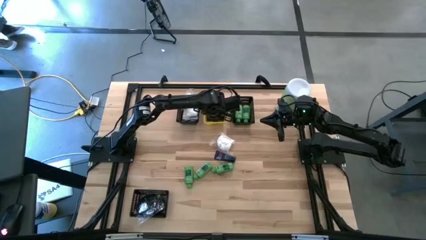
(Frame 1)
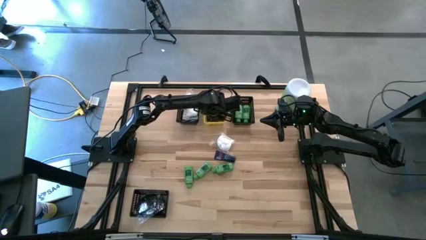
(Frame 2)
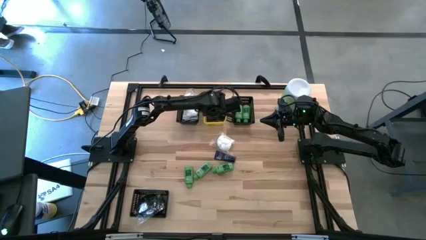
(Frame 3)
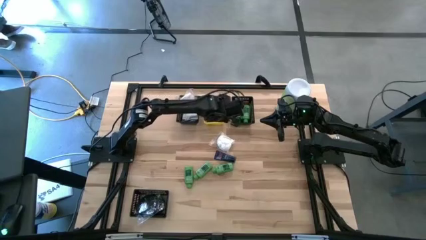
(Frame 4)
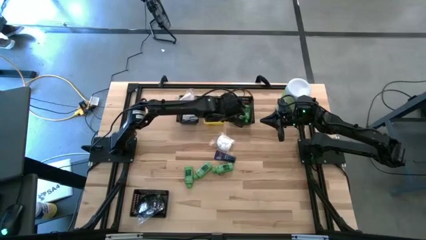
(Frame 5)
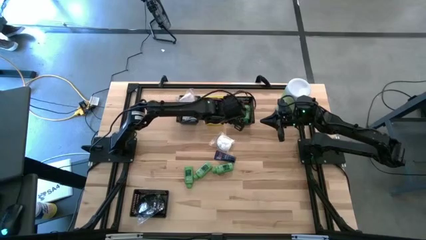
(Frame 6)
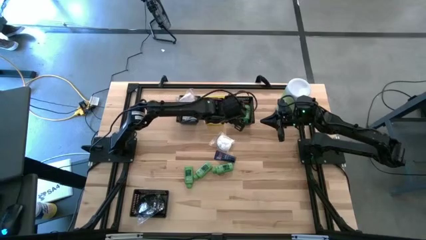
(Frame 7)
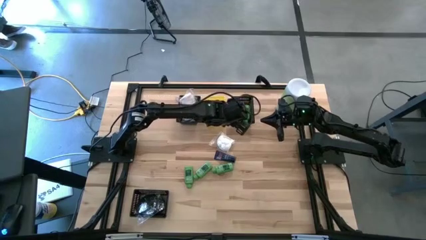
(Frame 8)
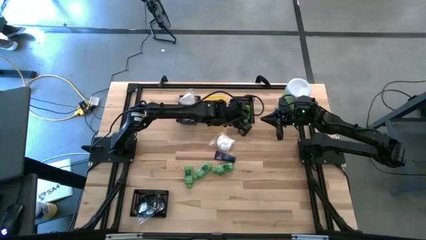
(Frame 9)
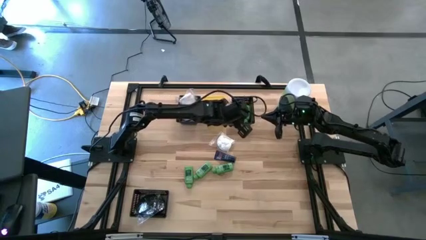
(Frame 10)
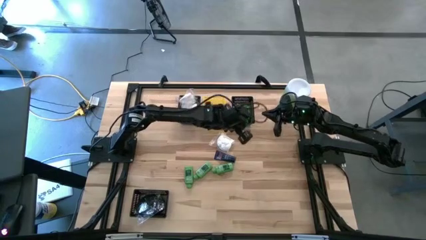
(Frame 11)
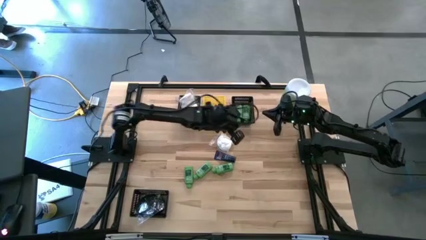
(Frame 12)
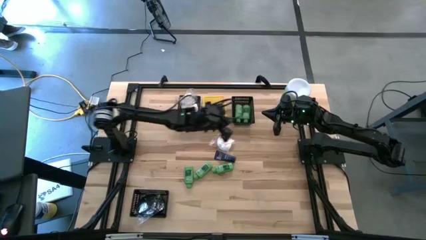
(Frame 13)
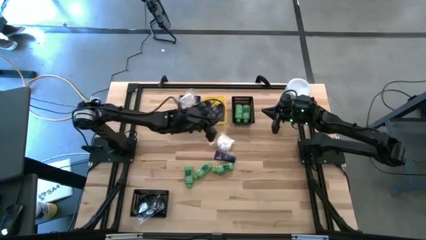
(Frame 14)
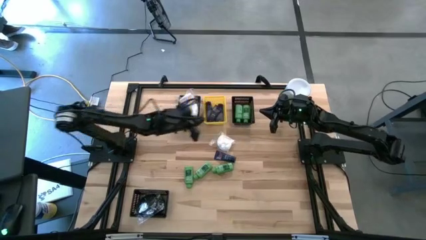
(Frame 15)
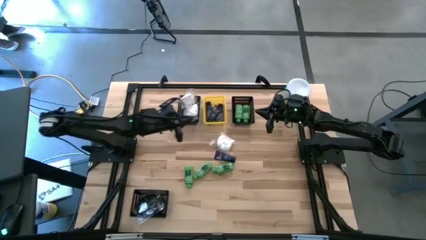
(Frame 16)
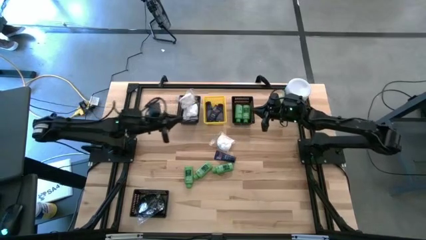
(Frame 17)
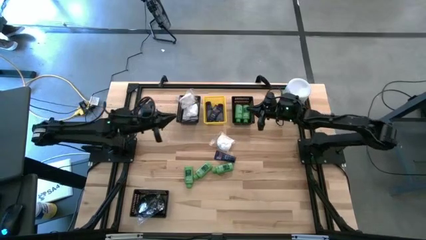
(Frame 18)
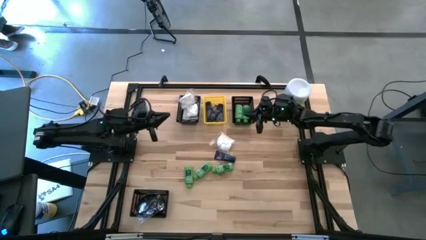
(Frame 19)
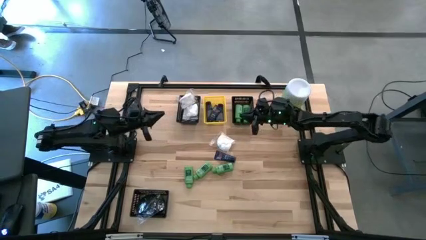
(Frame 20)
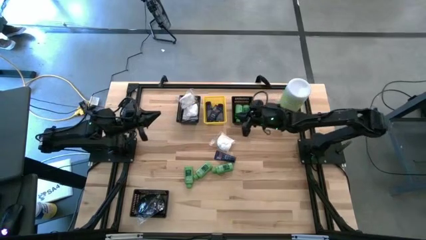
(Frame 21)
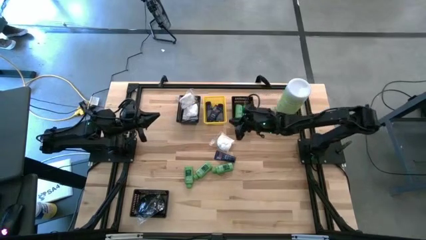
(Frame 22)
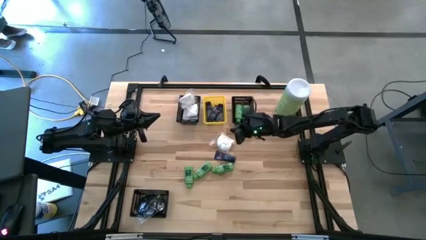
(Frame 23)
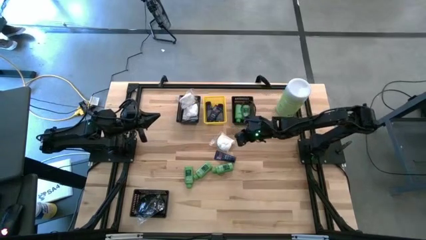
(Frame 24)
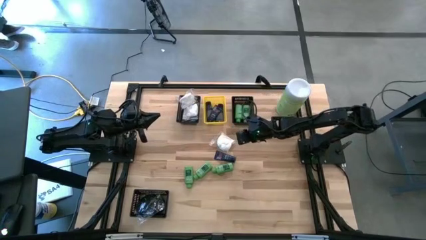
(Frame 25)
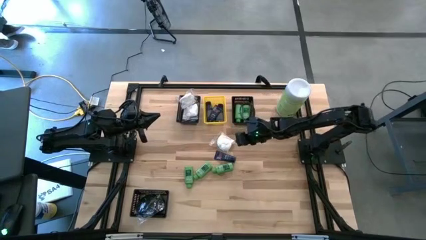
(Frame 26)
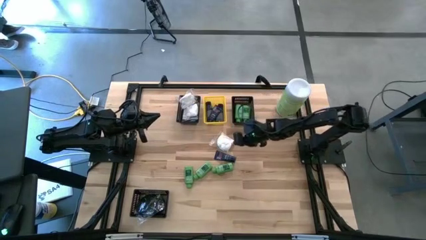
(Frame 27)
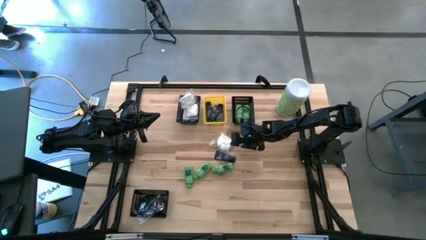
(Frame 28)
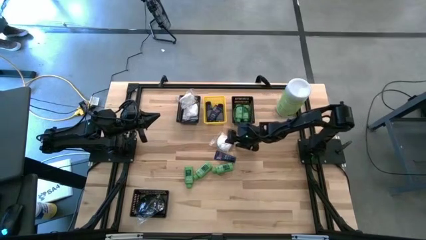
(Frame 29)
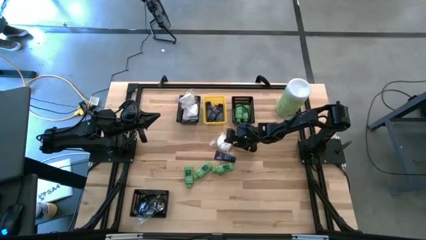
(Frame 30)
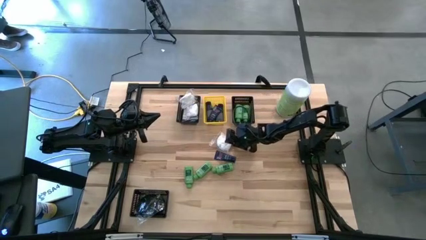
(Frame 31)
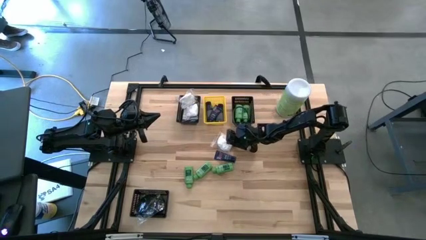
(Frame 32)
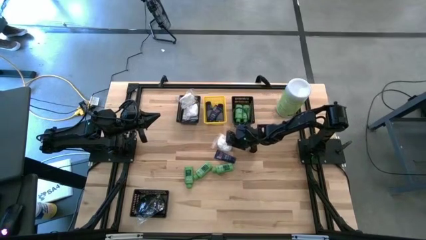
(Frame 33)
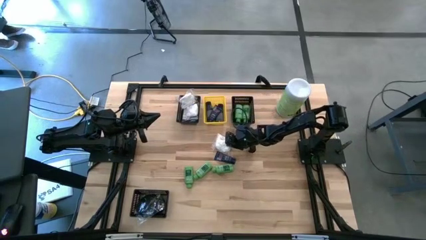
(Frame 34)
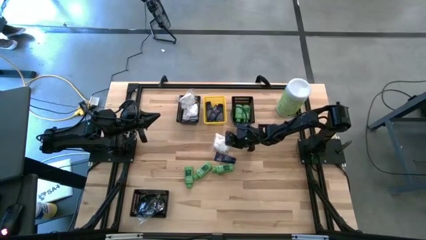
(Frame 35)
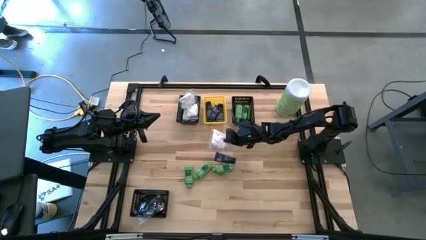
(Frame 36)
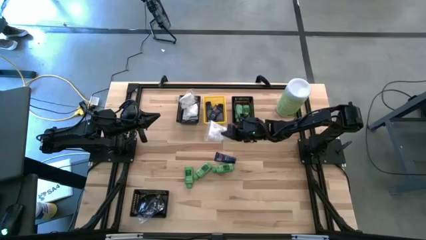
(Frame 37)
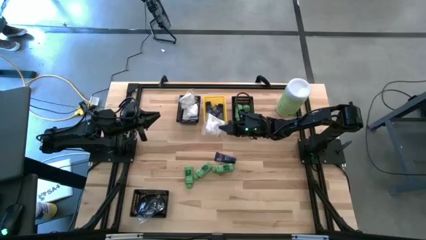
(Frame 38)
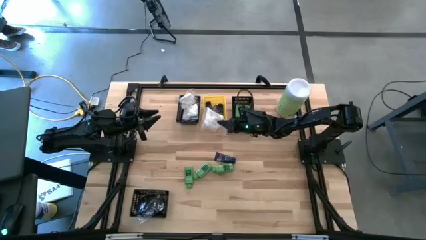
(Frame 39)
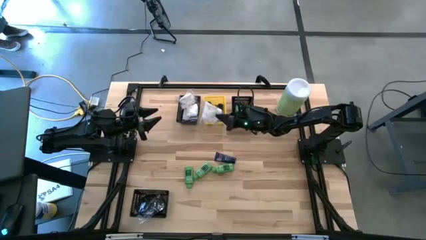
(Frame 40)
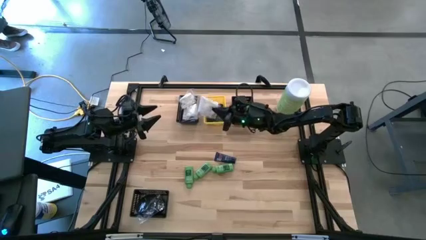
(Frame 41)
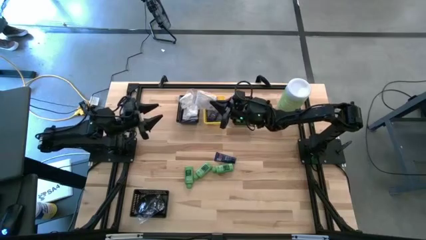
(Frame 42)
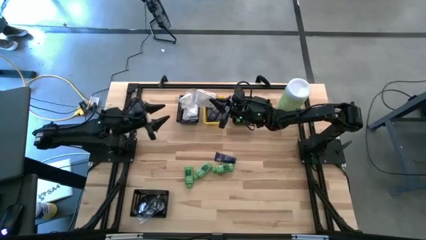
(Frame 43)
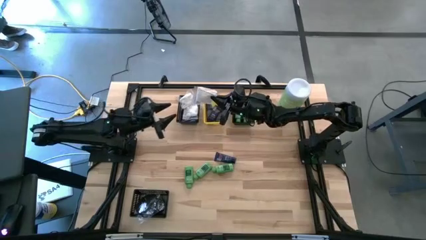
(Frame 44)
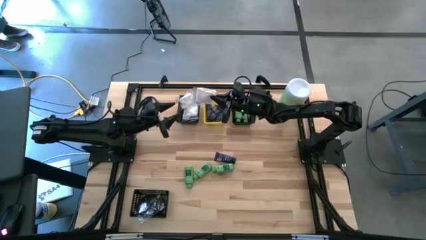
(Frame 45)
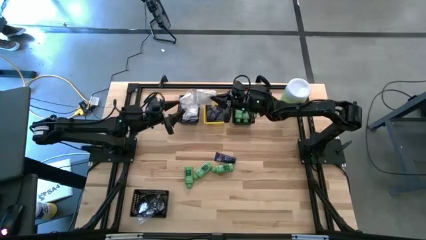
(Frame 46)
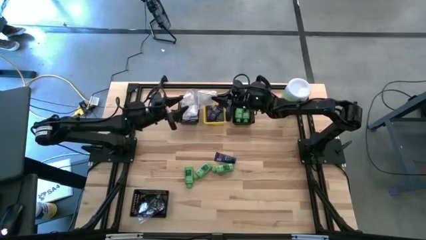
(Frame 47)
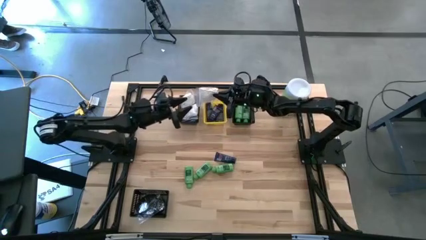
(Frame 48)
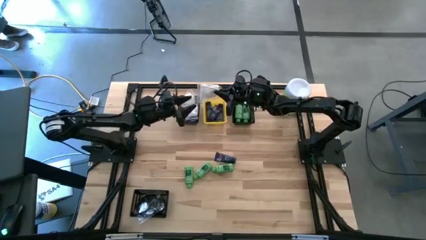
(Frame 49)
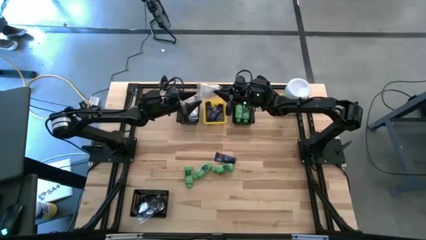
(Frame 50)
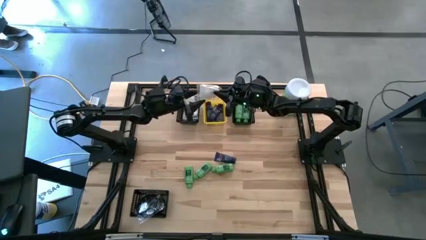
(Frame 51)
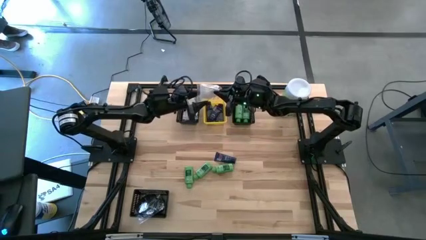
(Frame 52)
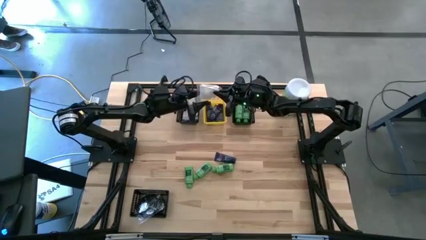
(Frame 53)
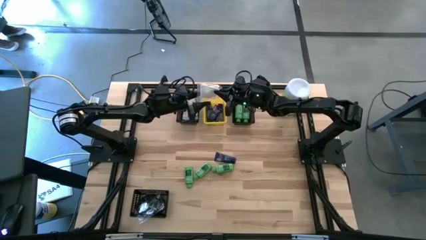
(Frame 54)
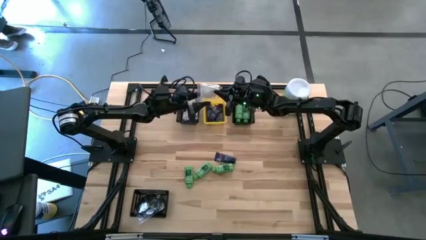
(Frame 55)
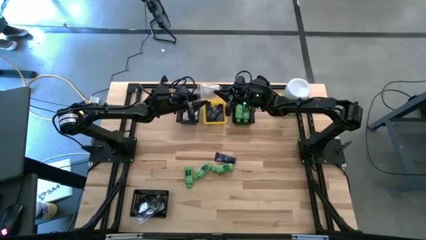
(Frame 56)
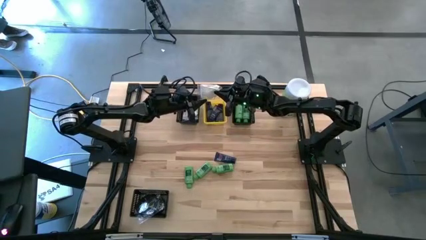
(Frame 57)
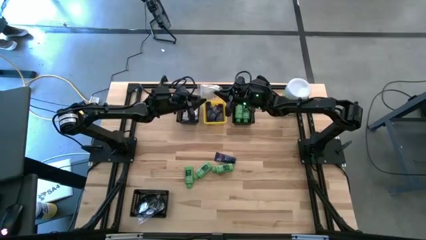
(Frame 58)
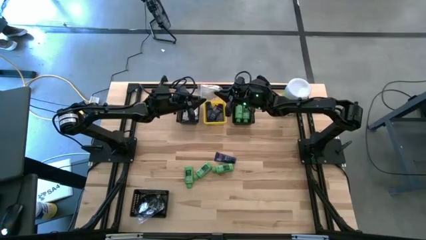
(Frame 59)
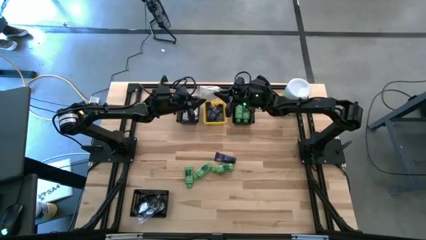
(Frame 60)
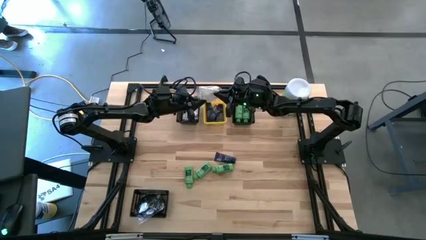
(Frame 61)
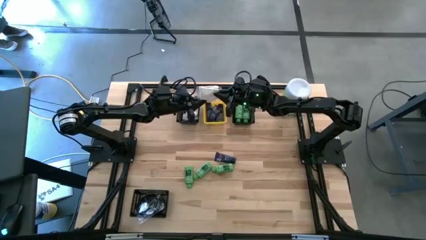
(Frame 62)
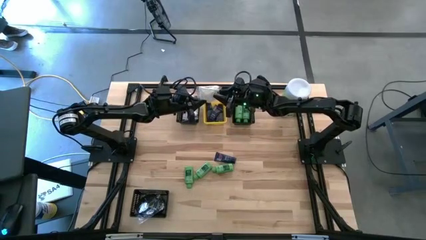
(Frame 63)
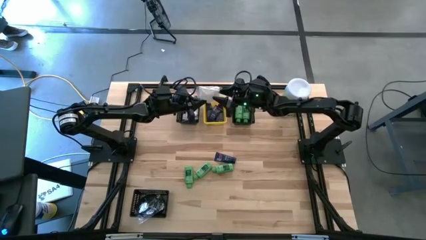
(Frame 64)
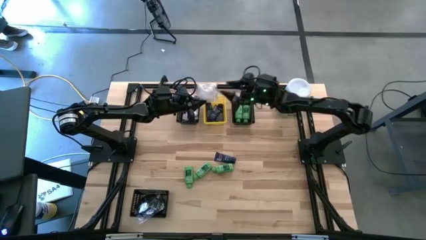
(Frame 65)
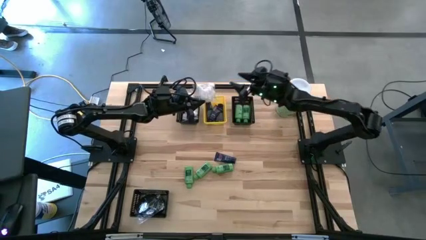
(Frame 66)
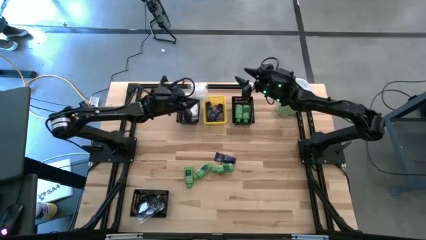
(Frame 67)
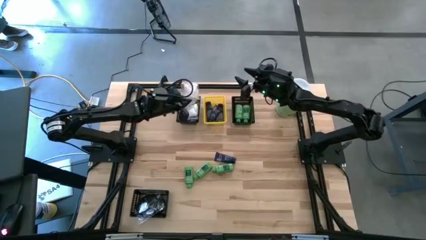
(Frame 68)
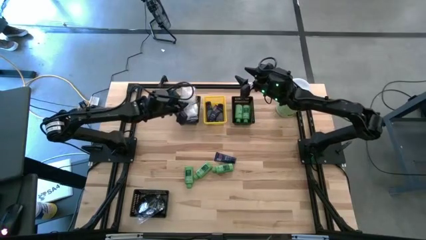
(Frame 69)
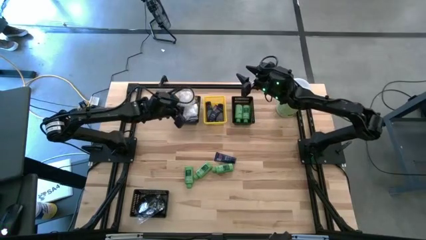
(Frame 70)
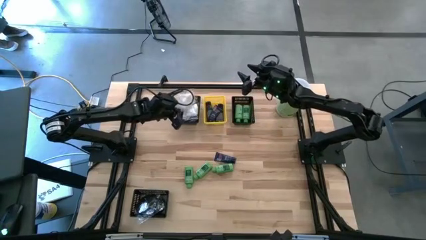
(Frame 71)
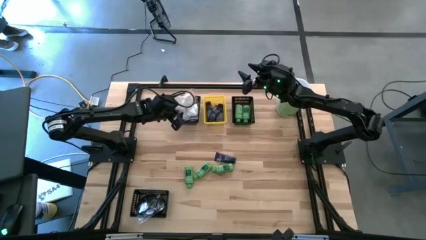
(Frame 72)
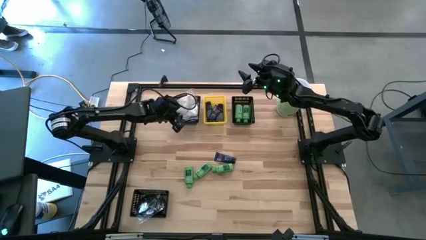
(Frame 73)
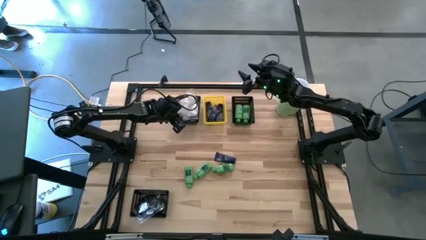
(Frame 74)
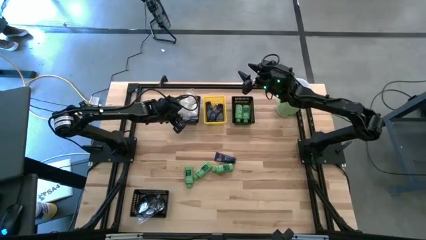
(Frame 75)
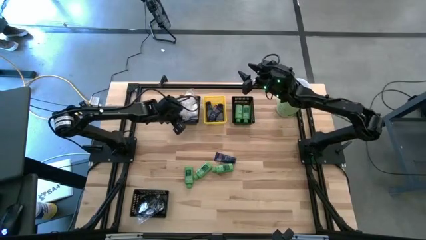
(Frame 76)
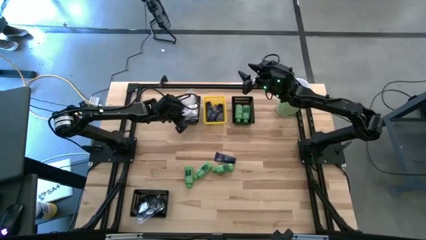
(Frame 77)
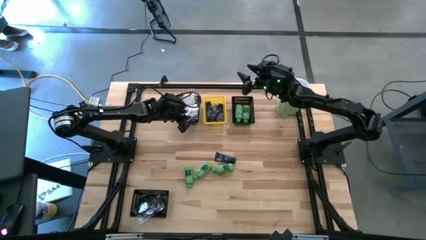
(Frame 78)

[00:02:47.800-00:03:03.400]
Task: Pick & Place Travel size toiletries
Put the cotton pack into the top left black bin
